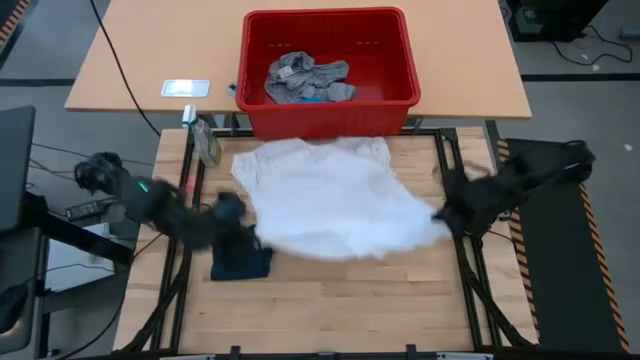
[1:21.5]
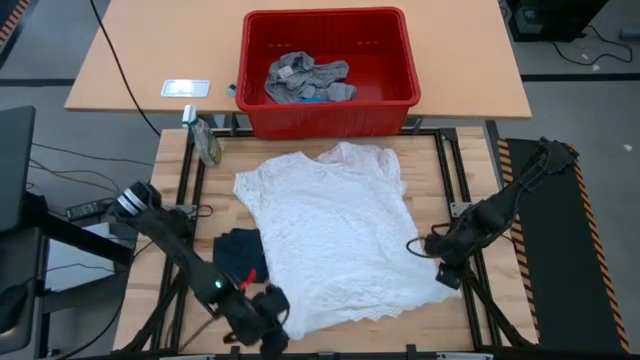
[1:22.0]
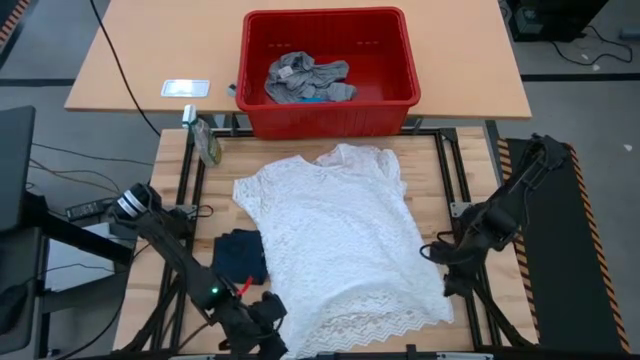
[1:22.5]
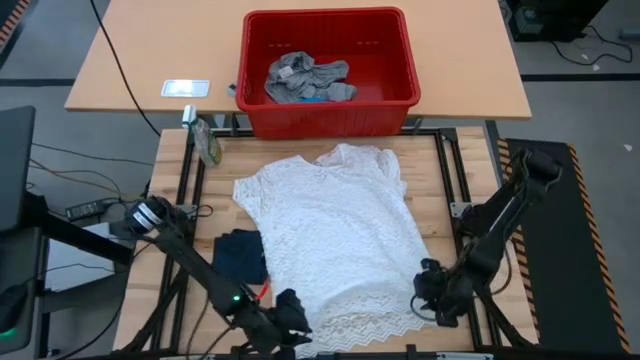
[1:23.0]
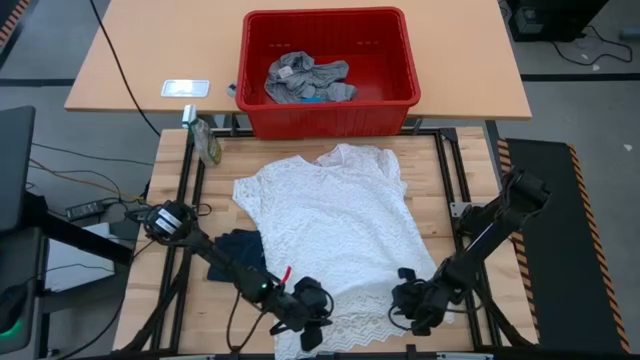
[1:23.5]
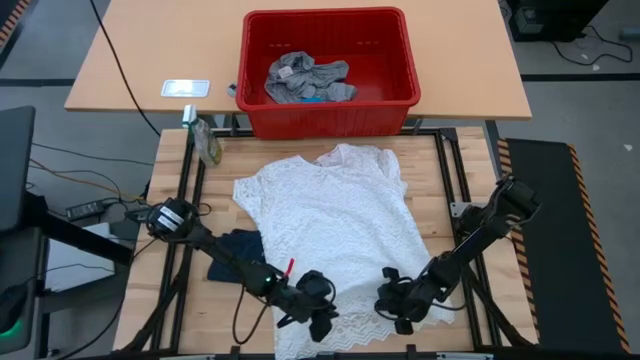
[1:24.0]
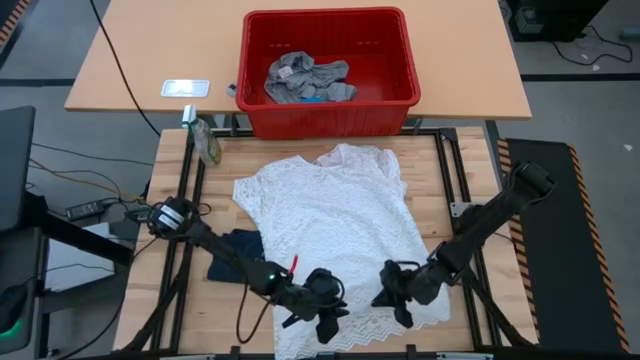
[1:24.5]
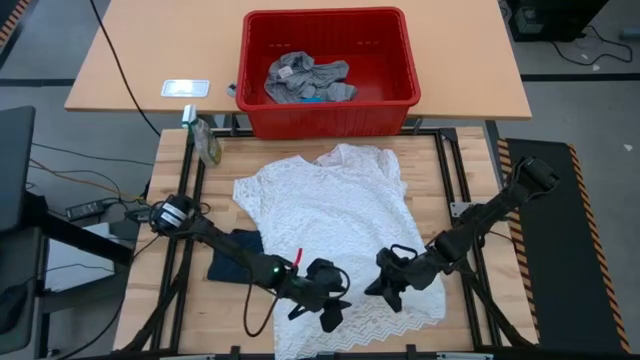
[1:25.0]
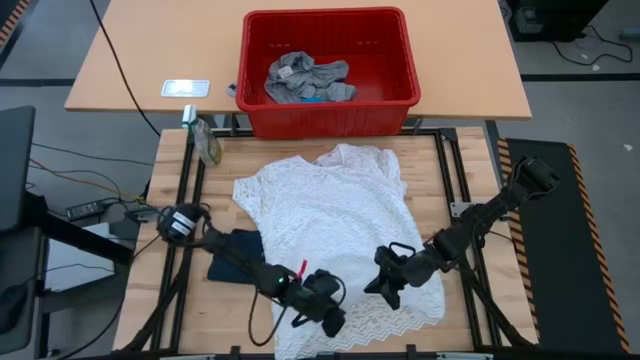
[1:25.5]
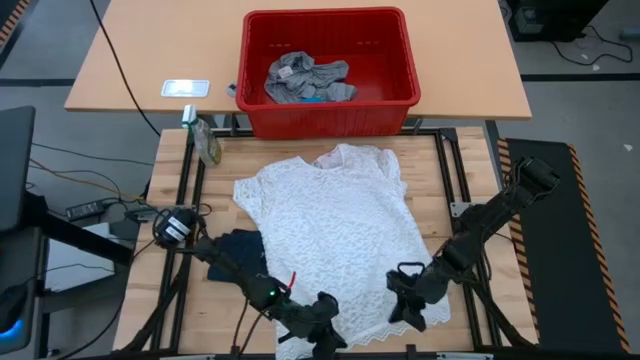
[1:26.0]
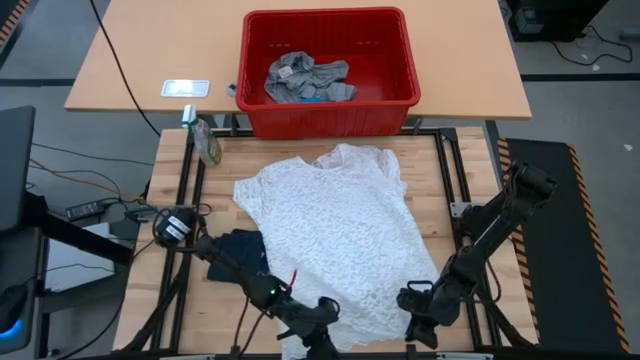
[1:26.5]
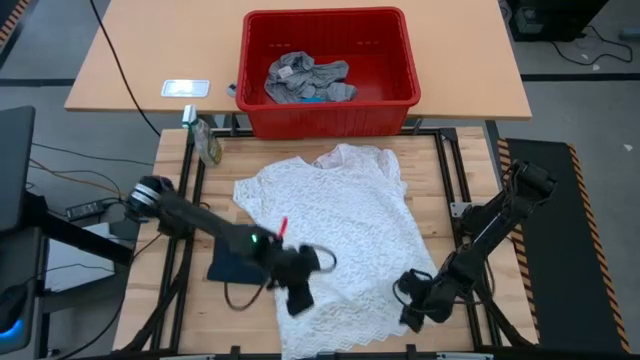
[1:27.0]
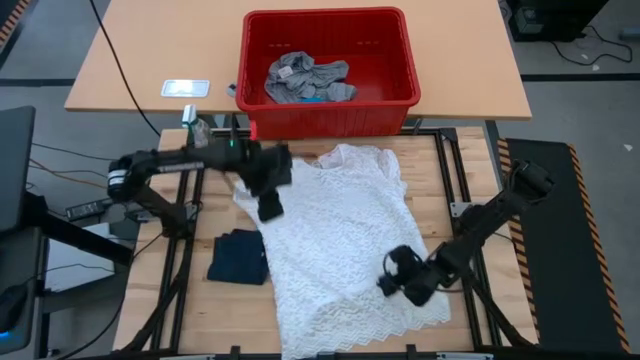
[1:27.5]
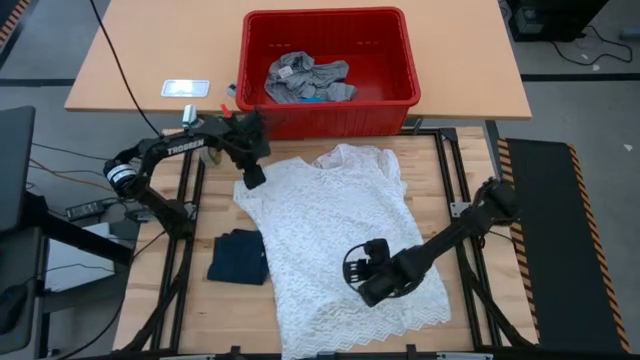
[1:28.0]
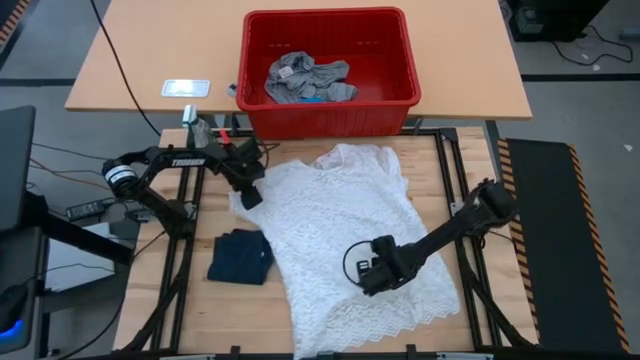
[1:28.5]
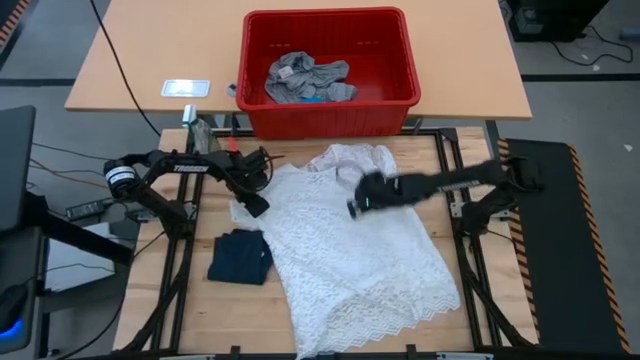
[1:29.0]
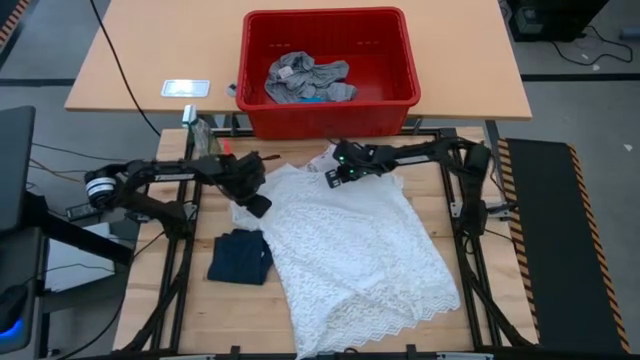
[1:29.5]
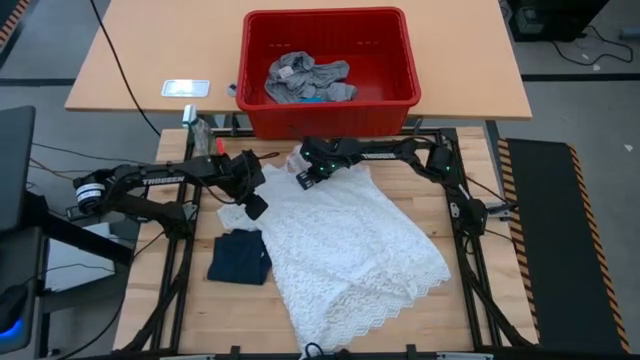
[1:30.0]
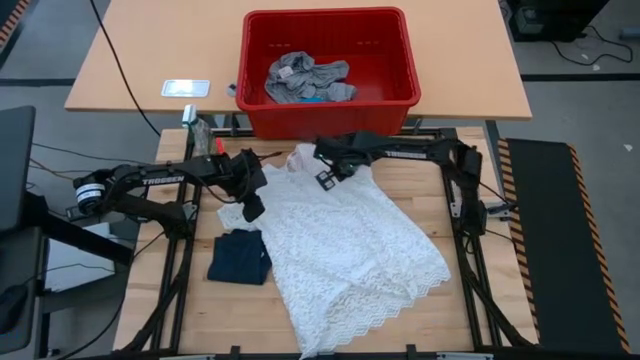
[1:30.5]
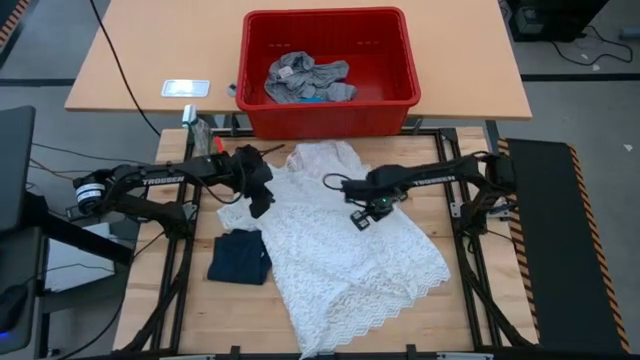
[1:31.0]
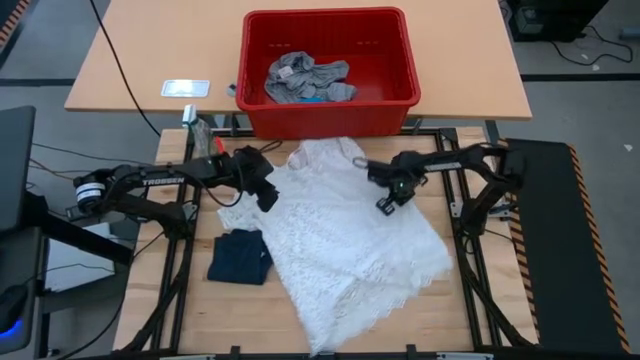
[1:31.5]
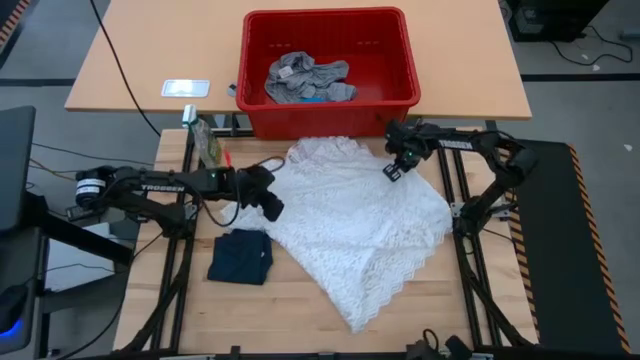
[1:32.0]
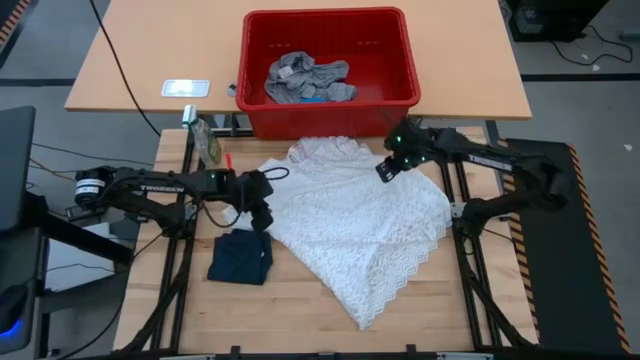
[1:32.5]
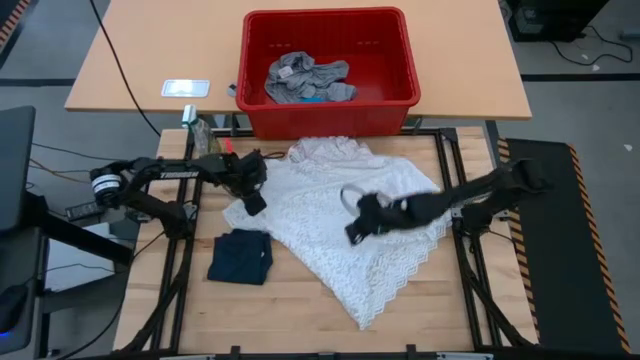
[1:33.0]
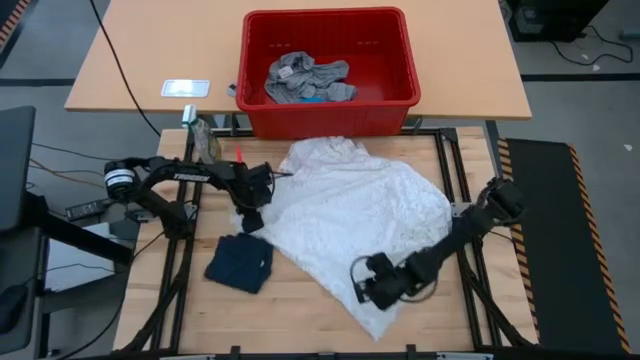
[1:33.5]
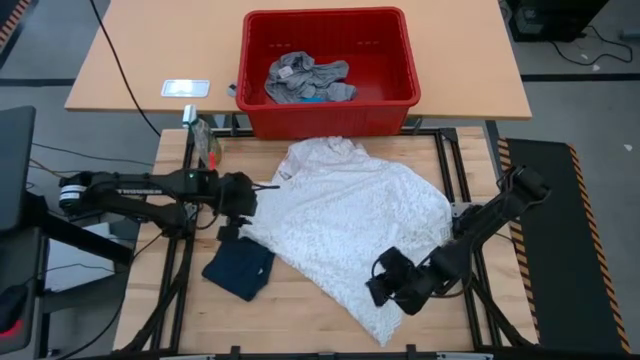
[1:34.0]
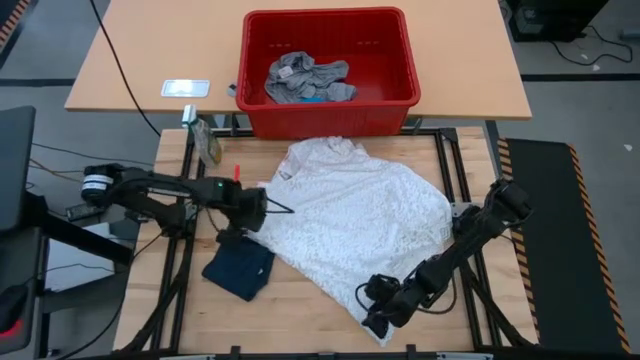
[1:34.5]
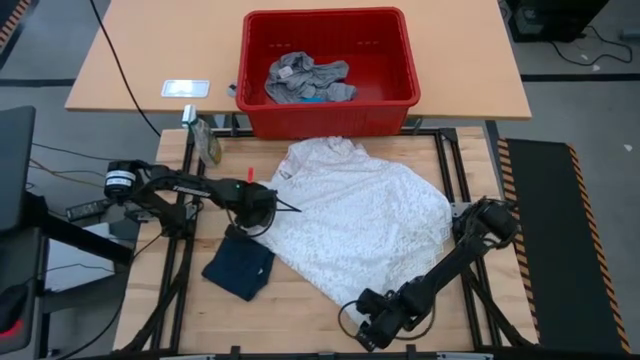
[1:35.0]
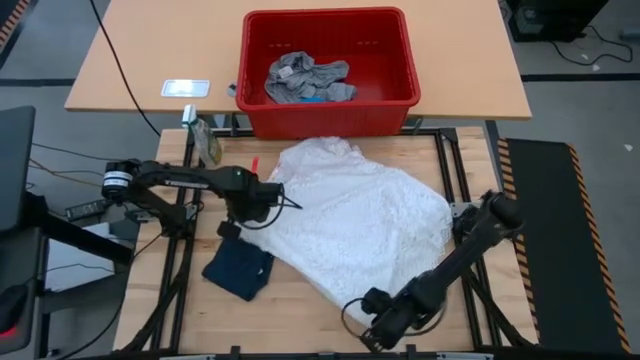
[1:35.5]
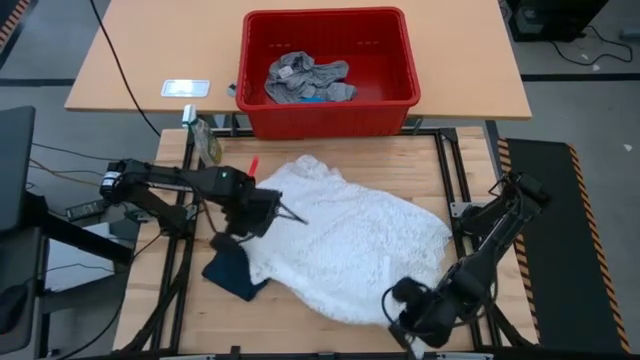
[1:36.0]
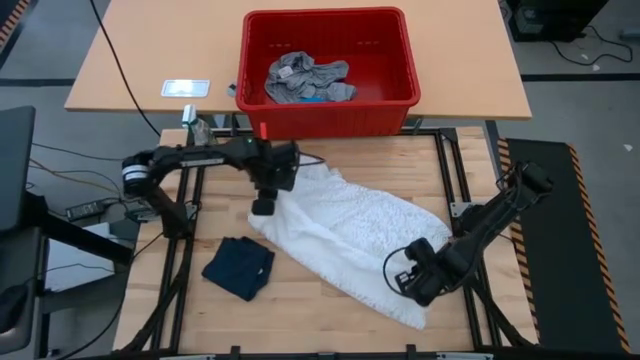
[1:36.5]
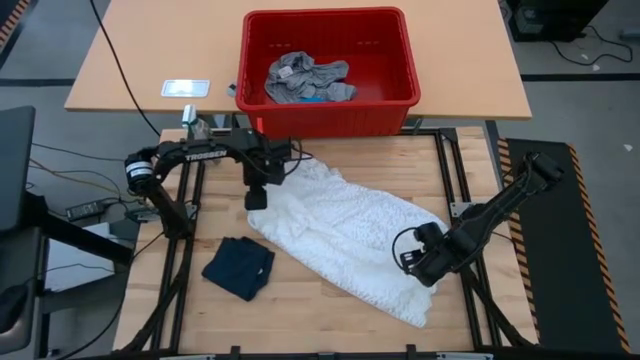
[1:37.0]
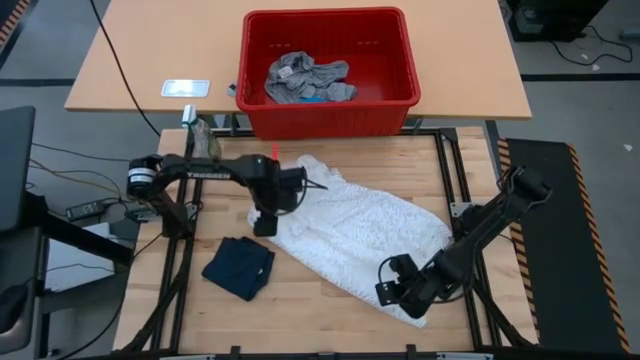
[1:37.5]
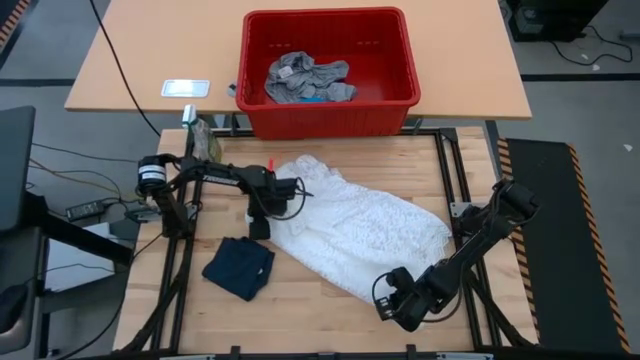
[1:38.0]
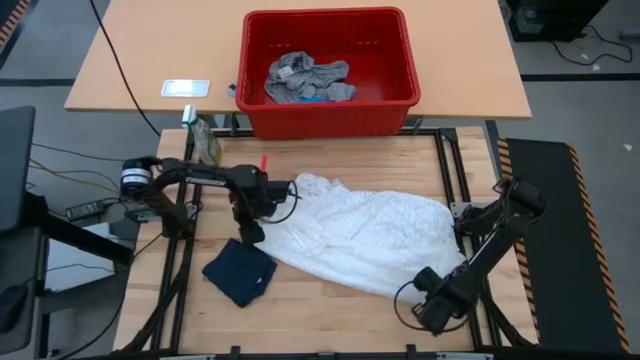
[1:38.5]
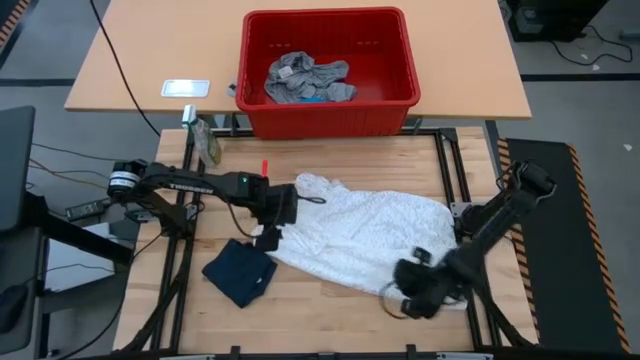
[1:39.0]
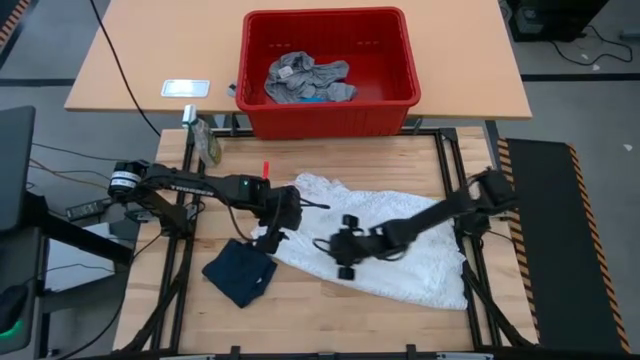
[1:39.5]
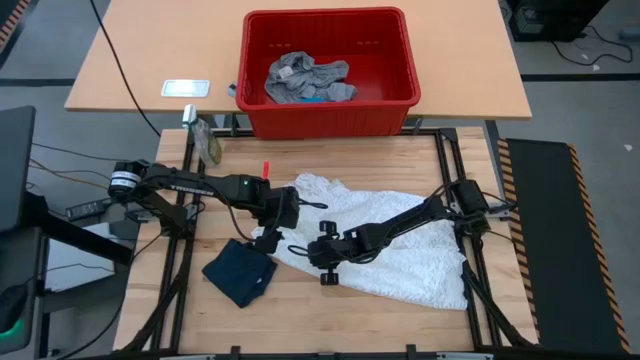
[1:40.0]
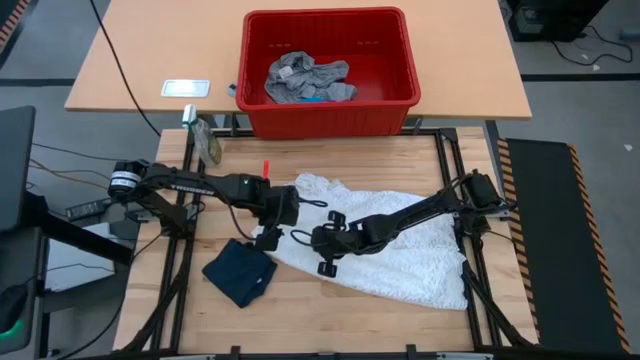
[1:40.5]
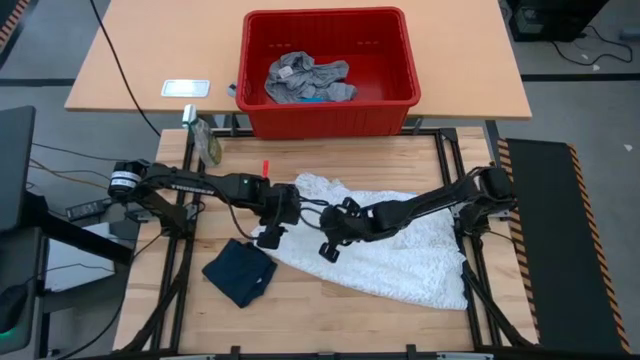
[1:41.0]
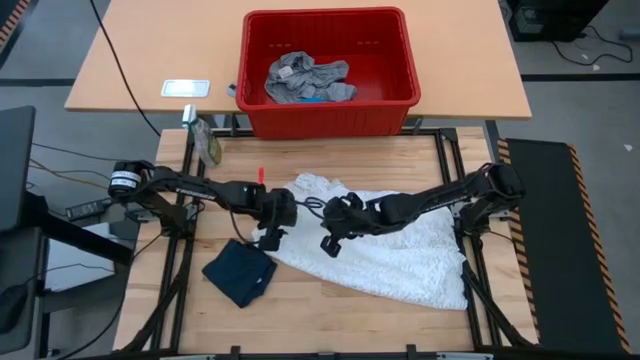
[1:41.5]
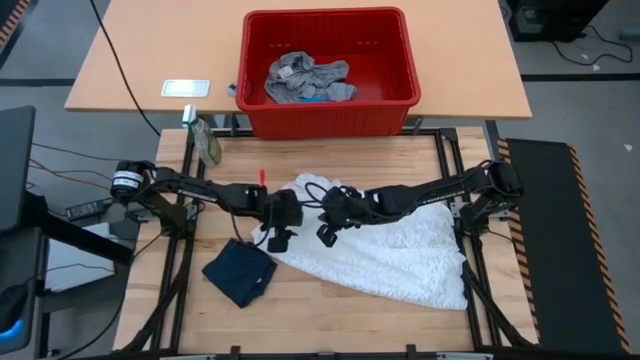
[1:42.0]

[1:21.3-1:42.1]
Task: Fold laundry
Fold the white dress
